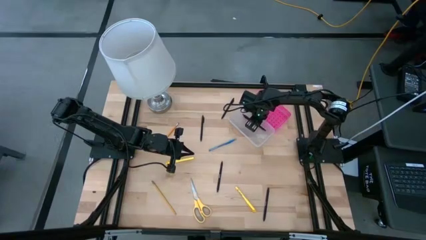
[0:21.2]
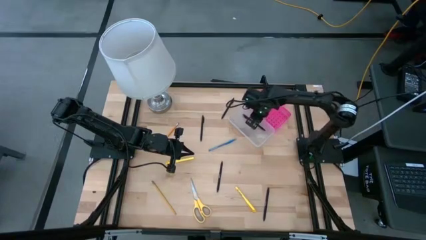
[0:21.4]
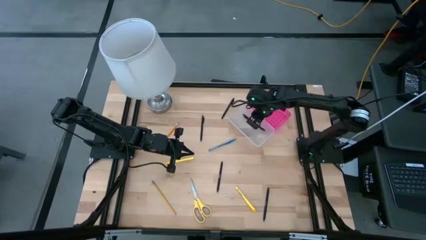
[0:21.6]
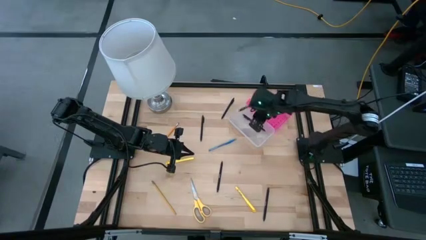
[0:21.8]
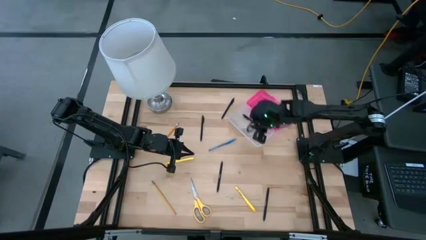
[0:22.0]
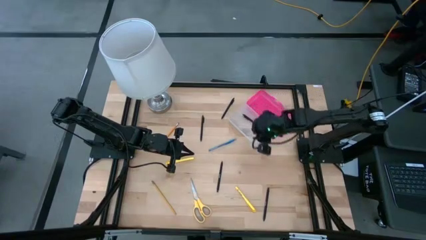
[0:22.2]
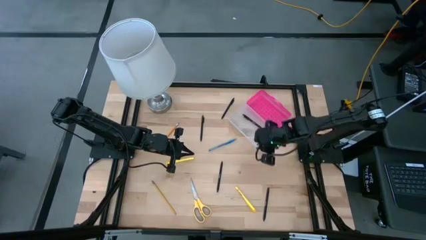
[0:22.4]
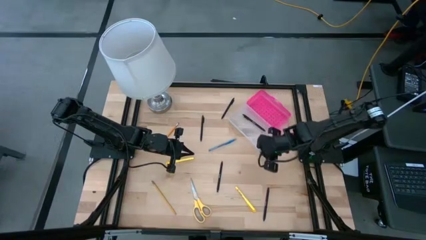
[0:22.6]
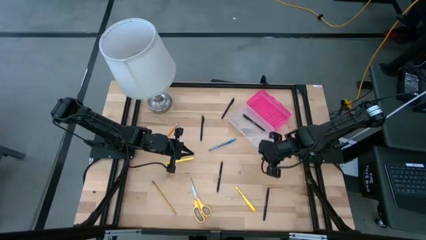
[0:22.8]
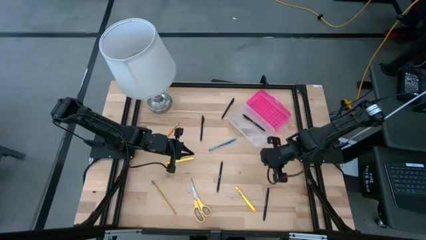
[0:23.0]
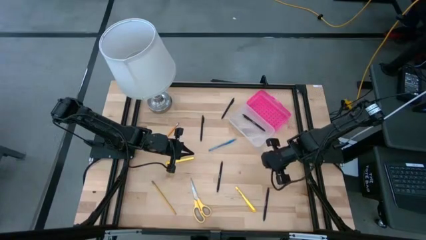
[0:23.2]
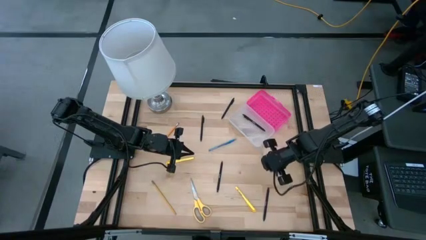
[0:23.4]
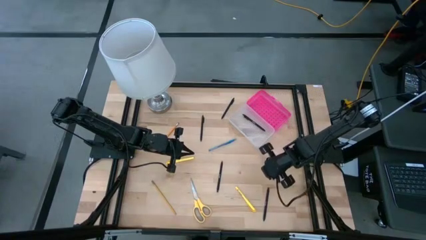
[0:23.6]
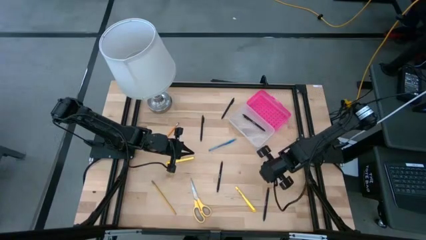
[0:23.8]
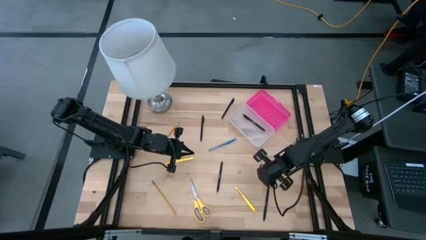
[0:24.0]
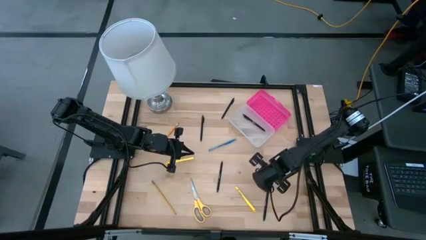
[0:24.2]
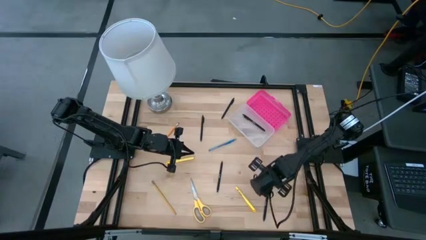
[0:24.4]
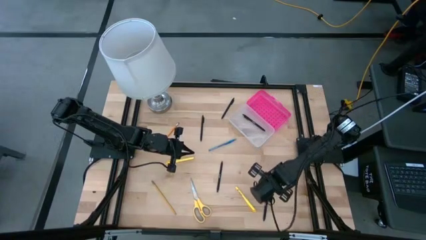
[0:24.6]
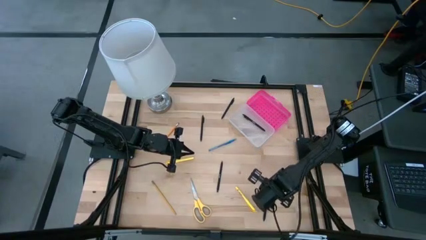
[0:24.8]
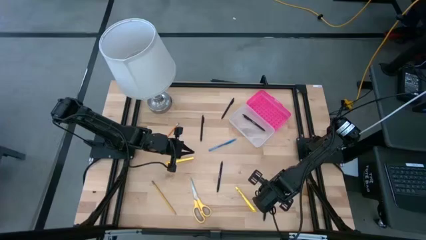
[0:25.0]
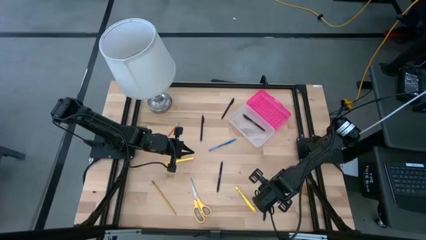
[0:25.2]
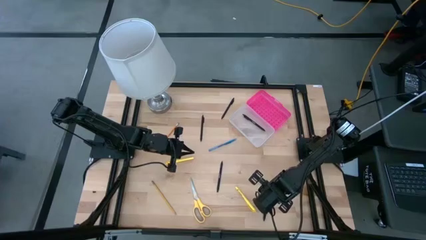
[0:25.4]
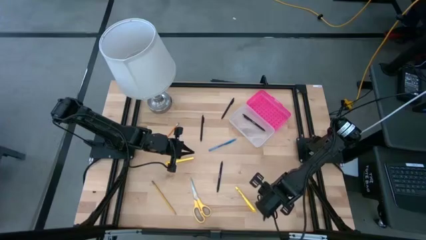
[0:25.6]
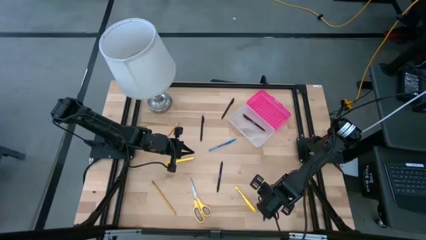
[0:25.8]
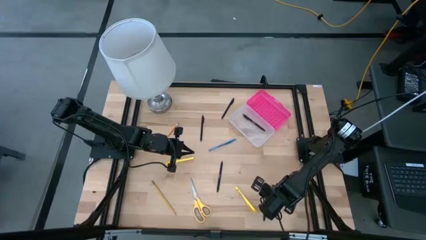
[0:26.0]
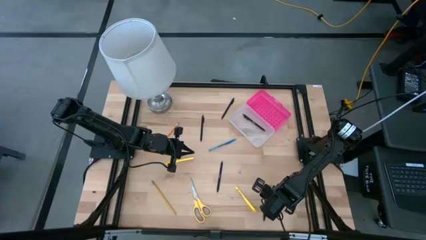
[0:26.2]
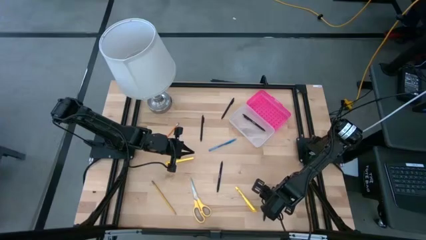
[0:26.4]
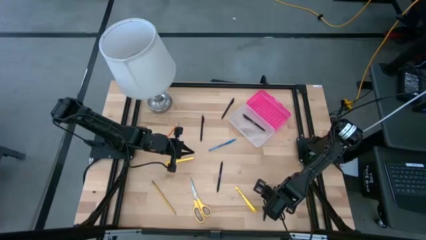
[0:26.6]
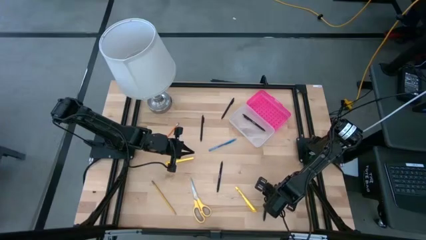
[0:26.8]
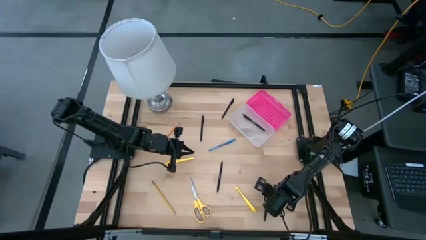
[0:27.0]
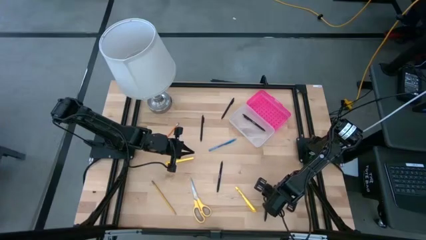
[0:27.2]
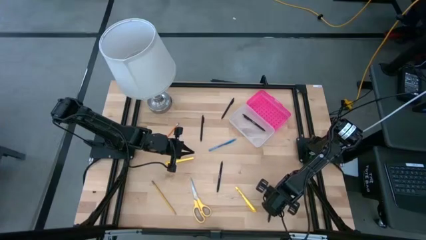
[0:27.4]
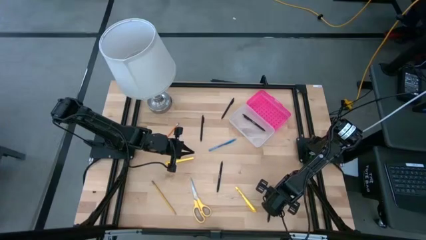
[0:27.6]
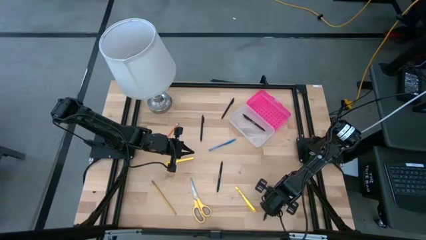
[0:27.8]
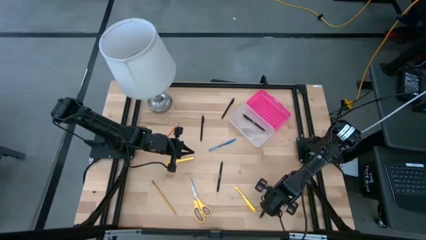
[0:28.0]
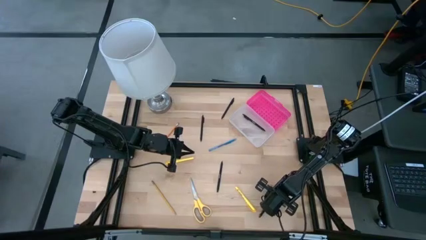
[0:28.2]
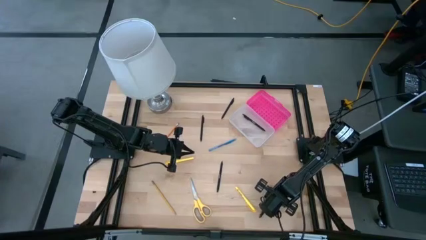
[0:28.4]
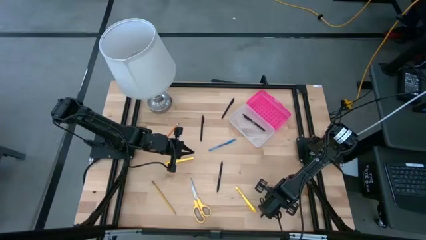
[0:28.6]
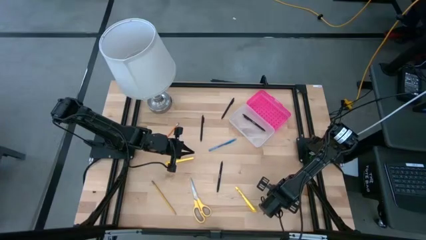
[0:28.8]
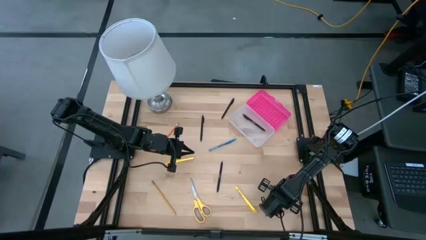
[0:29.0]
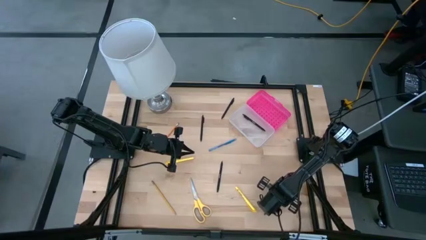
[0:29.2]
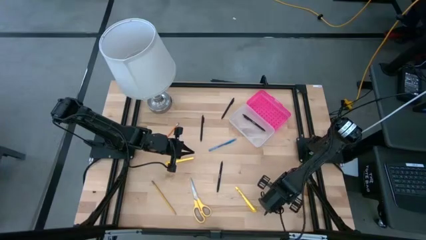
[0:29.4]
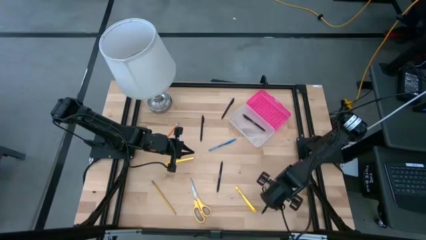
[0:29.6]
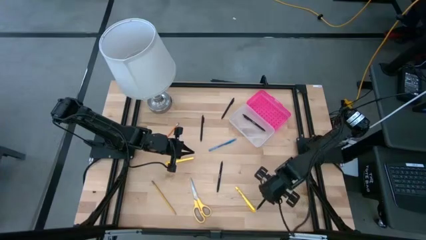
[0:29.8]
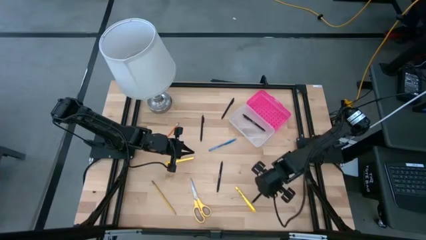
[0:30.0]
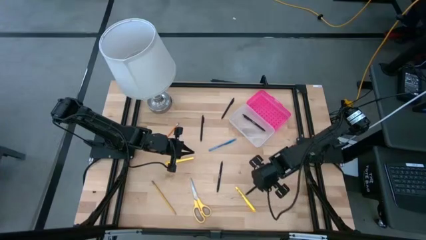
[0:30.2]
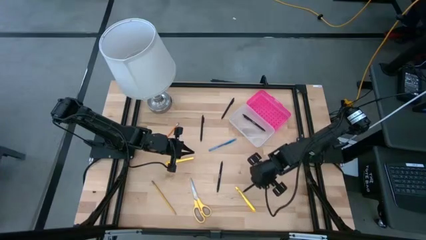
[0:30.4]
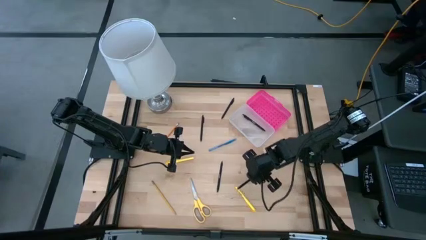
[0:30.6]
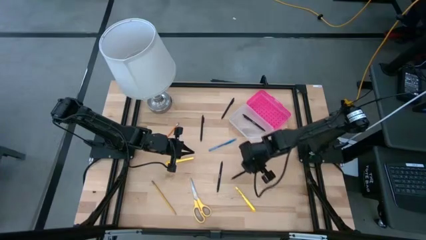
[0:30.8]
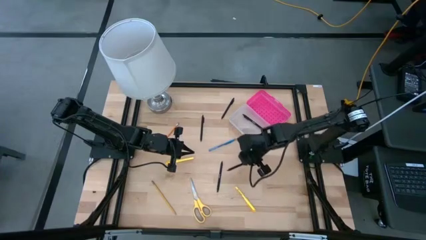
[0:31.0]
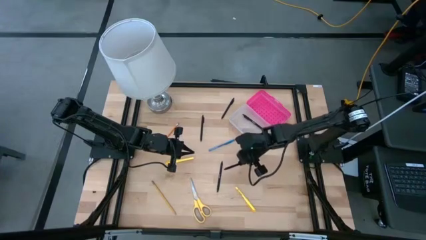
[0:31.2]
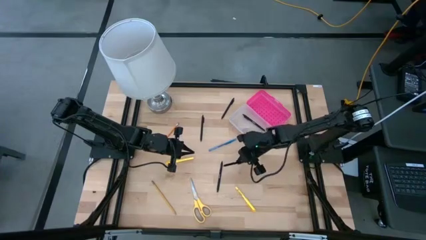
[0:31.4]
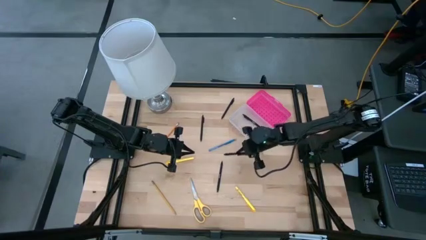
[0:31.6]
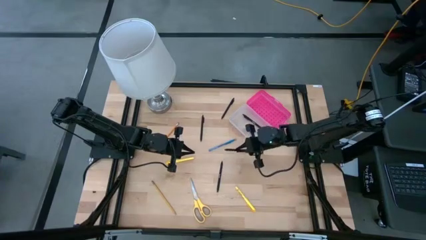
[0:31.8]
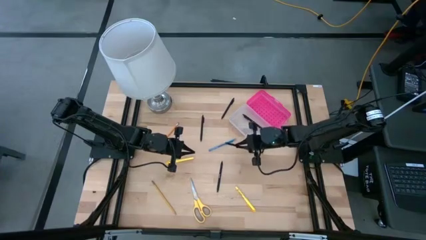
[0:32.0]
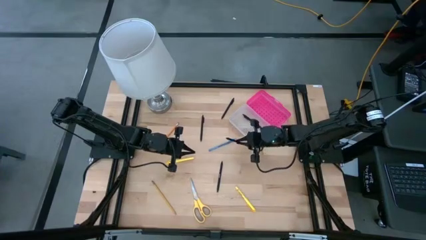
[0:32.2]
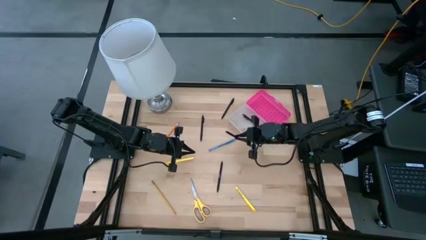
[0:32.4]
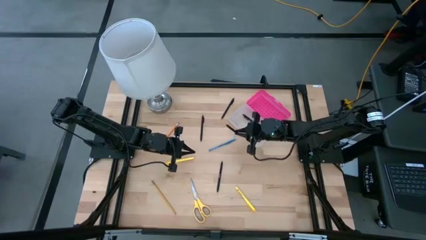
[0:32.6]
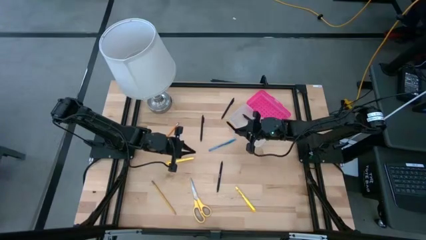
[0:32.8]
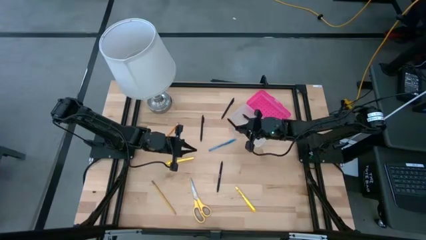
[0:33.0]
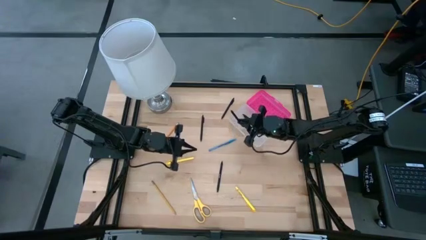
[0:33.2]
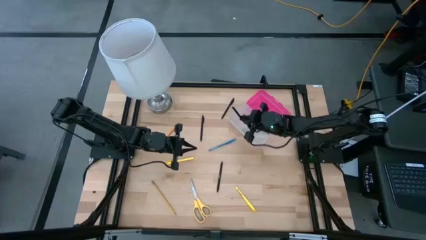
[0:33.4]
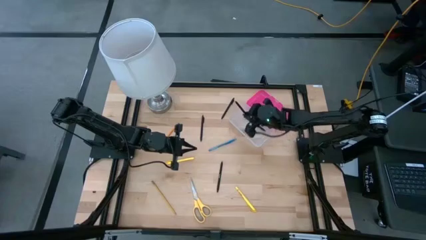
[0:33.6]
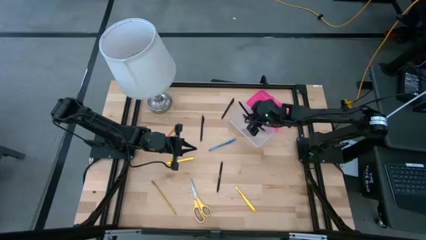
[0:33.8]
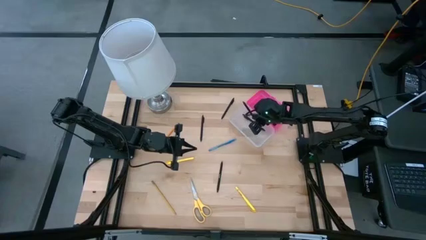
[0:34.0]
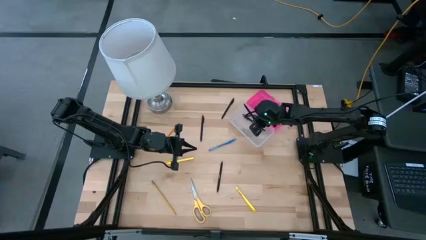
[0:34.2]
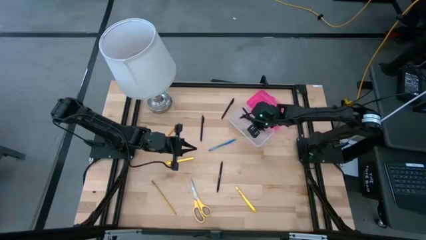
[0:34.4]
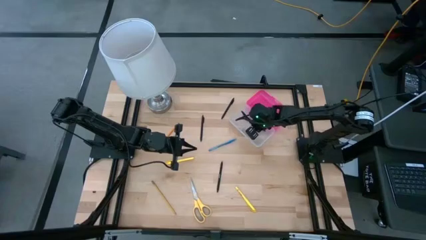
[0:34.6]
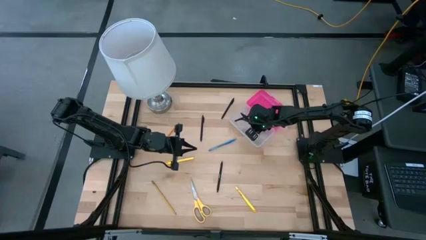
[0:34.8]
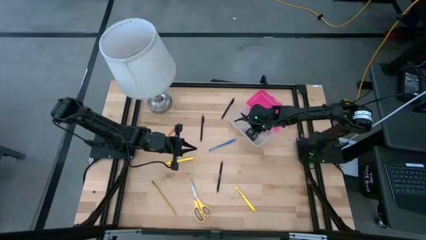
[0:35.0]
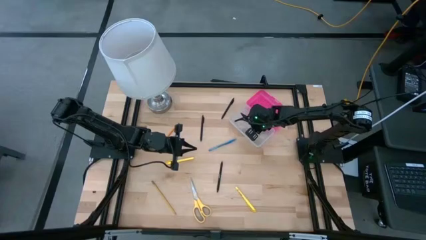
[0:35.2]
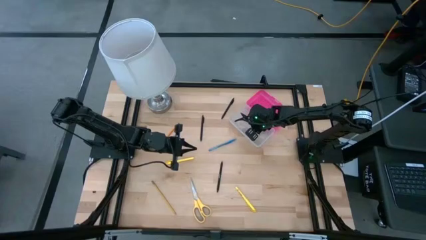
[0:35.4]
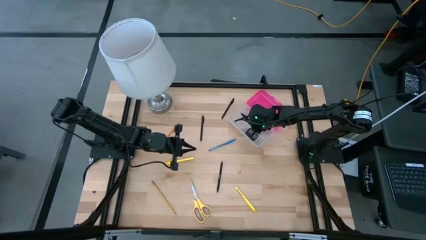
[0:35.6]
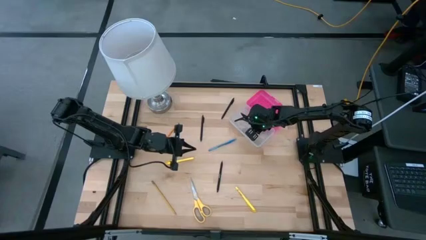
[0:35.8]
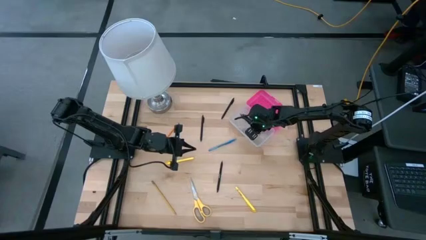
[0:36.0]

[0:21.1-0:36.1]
Task: Pick & place school supplies into a supply box
Put the black pen into the pink supply box
